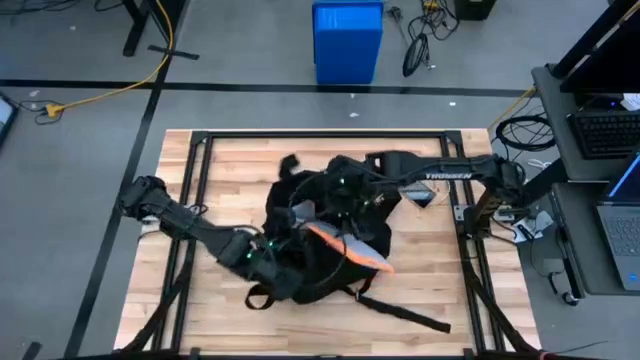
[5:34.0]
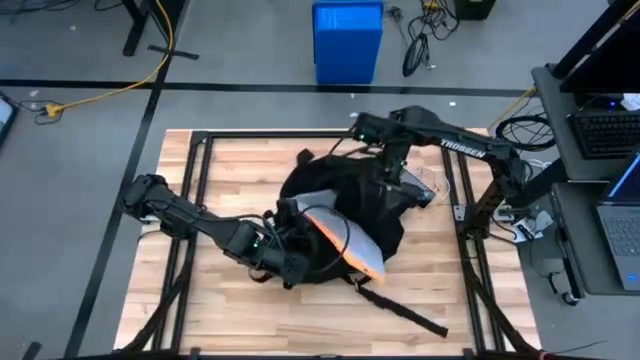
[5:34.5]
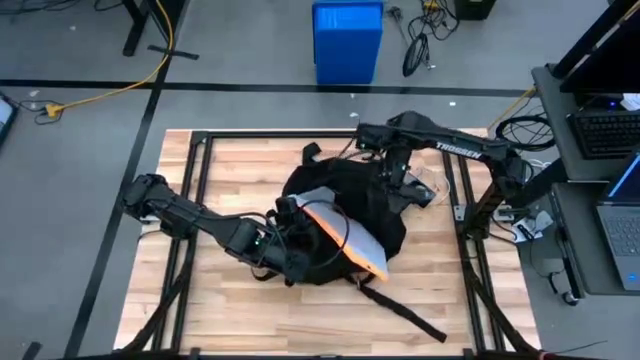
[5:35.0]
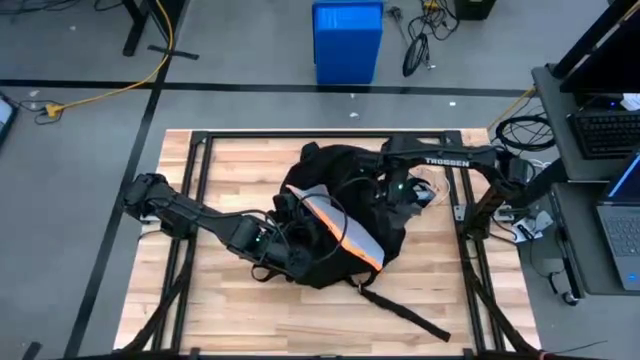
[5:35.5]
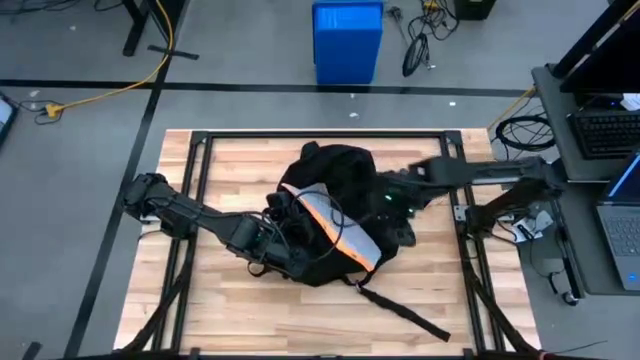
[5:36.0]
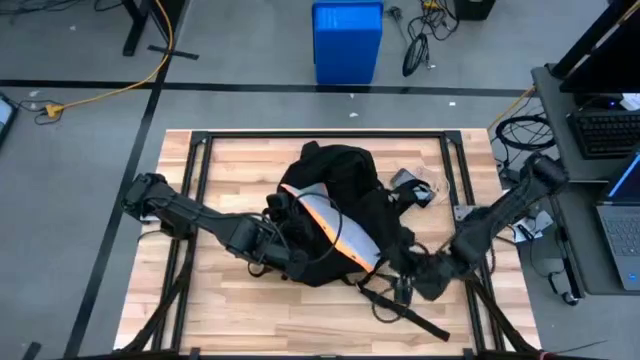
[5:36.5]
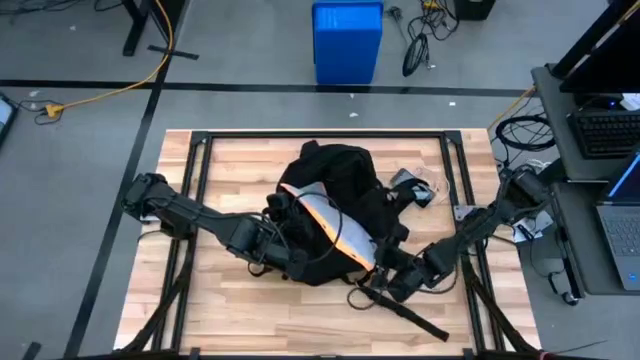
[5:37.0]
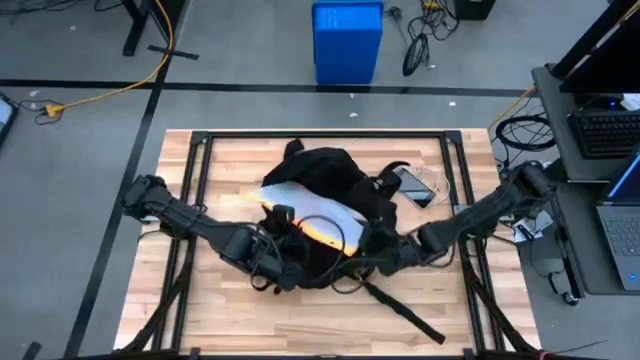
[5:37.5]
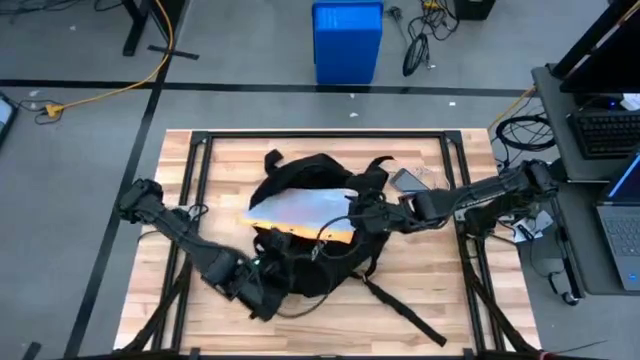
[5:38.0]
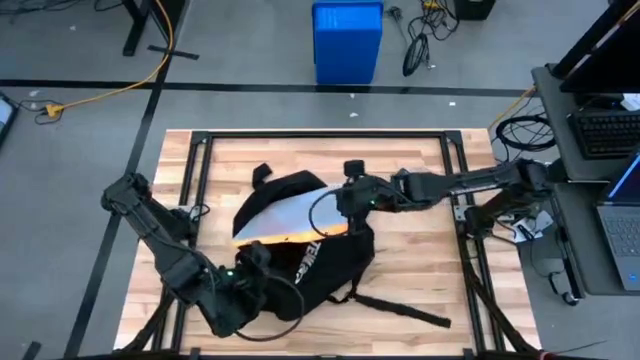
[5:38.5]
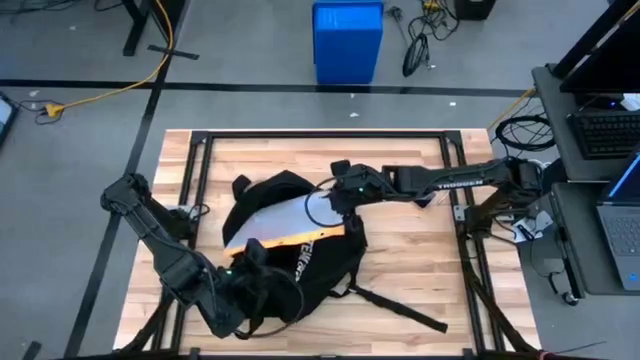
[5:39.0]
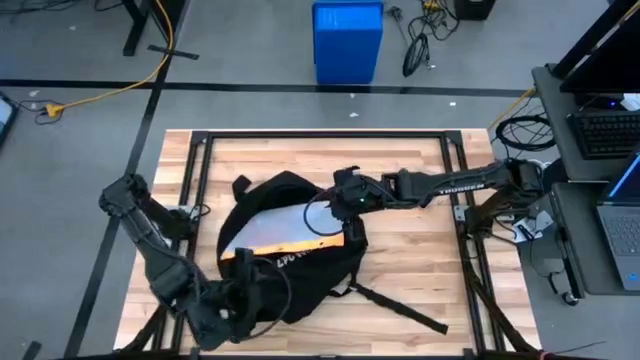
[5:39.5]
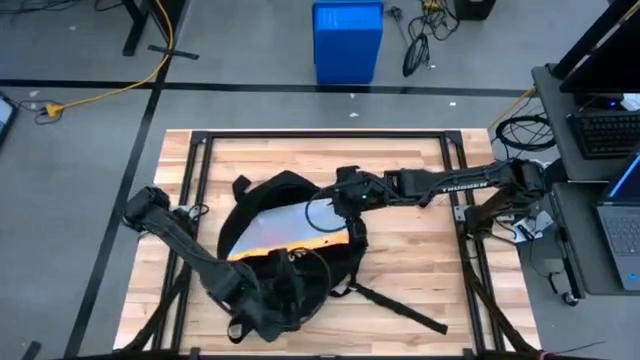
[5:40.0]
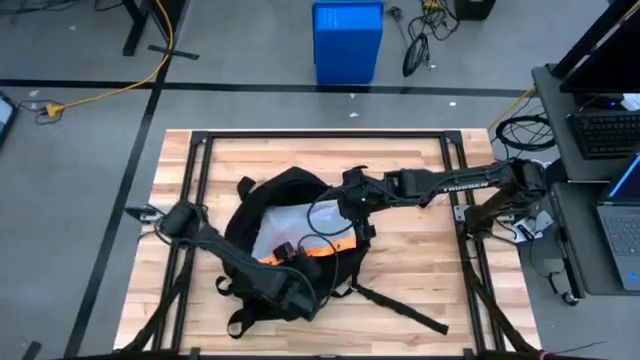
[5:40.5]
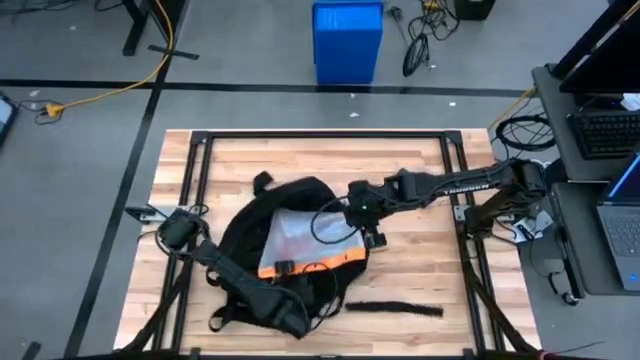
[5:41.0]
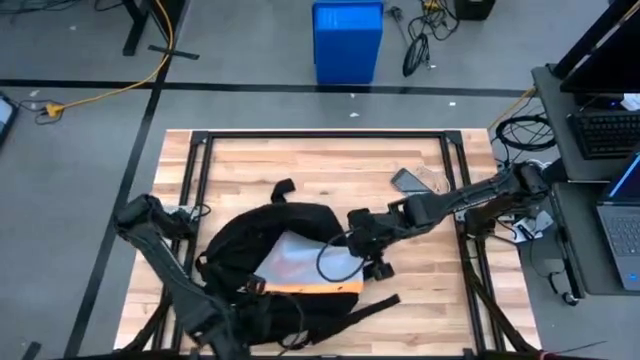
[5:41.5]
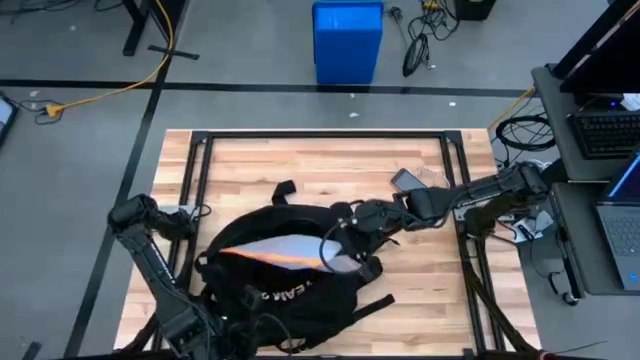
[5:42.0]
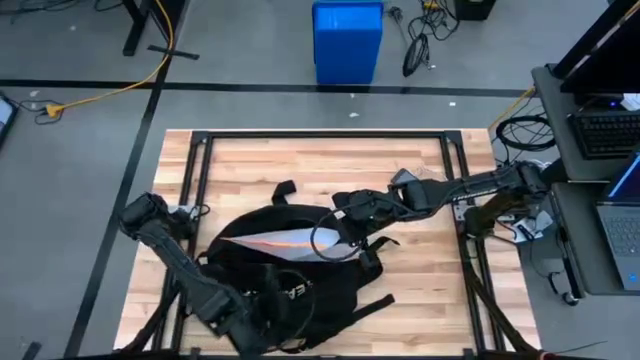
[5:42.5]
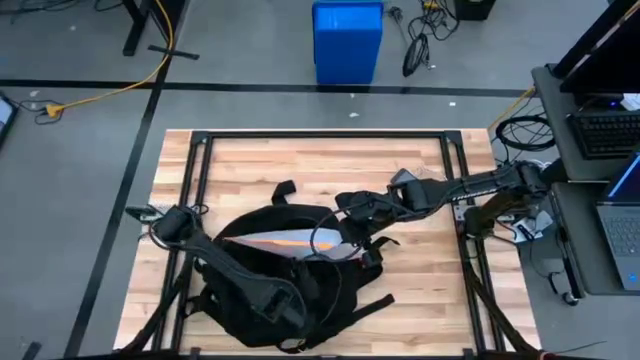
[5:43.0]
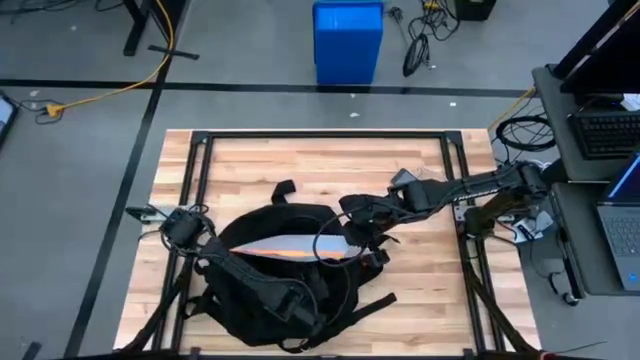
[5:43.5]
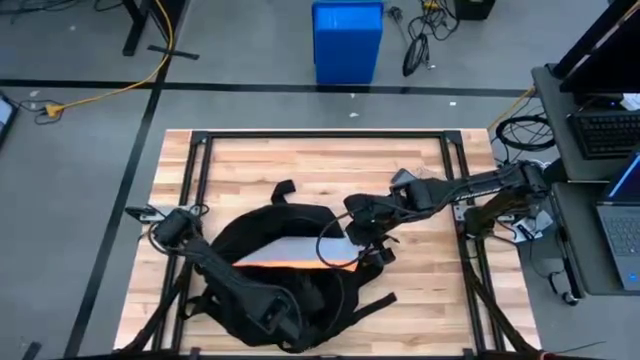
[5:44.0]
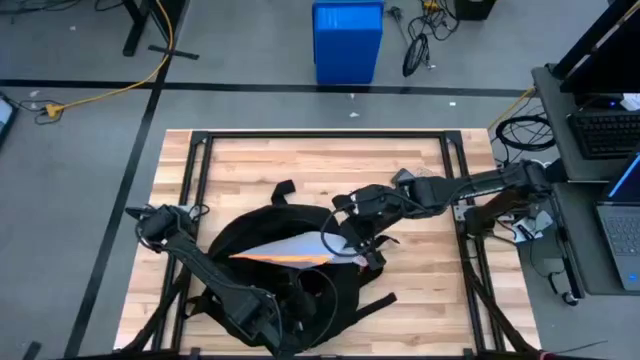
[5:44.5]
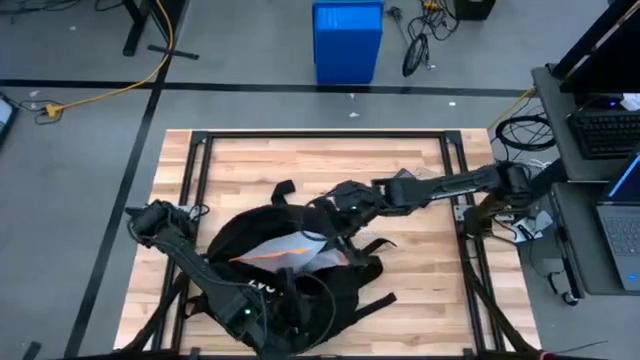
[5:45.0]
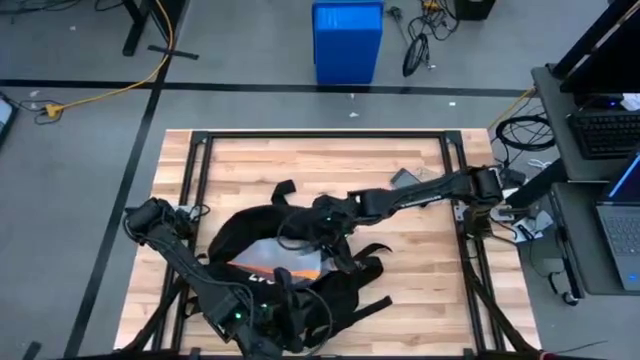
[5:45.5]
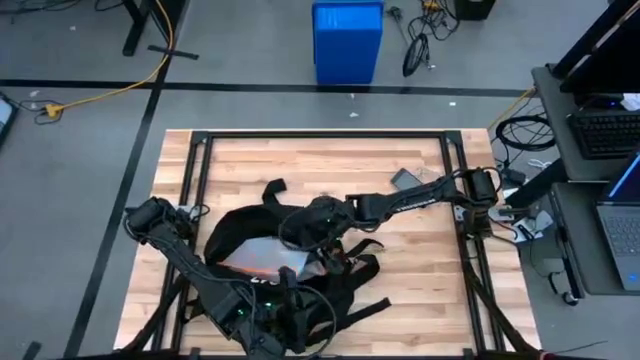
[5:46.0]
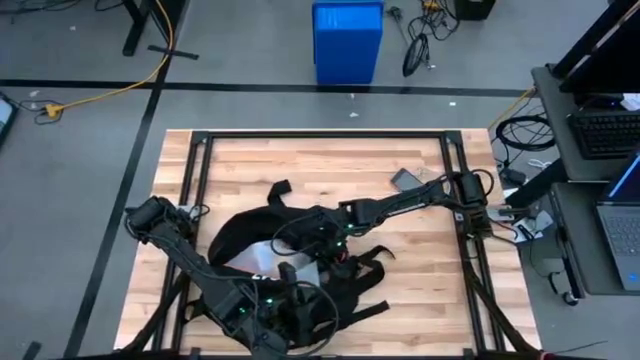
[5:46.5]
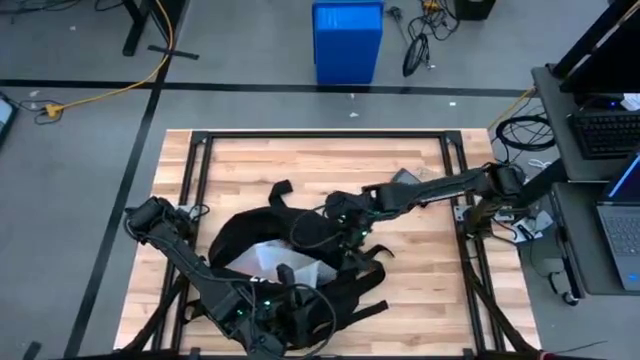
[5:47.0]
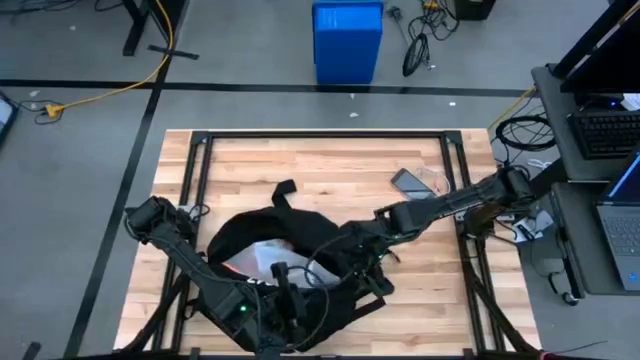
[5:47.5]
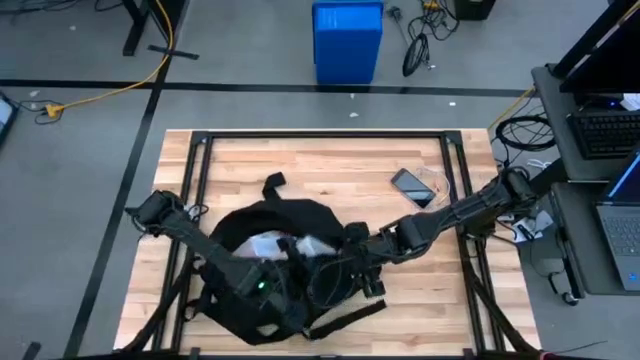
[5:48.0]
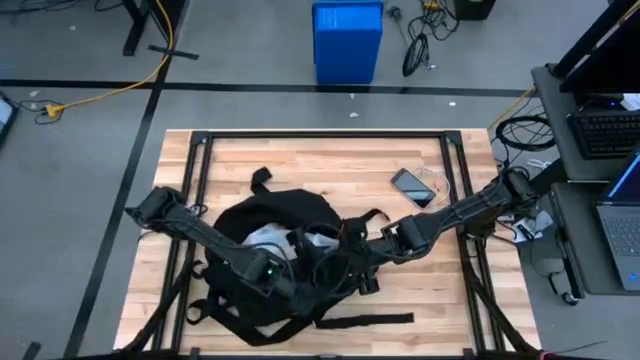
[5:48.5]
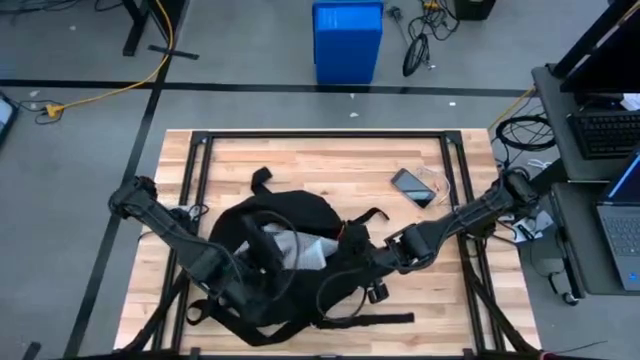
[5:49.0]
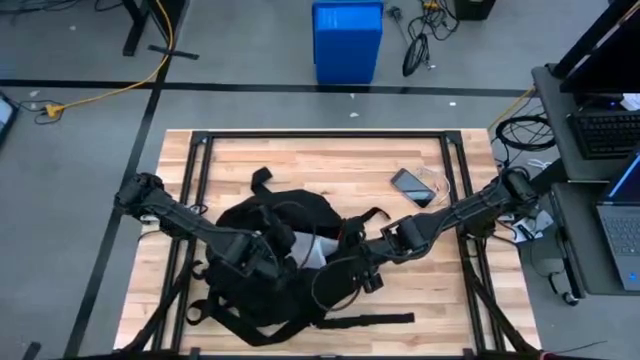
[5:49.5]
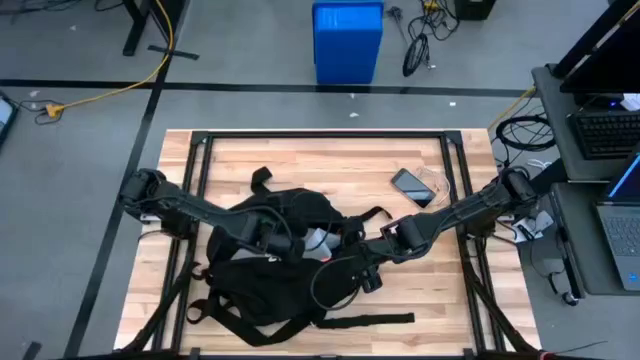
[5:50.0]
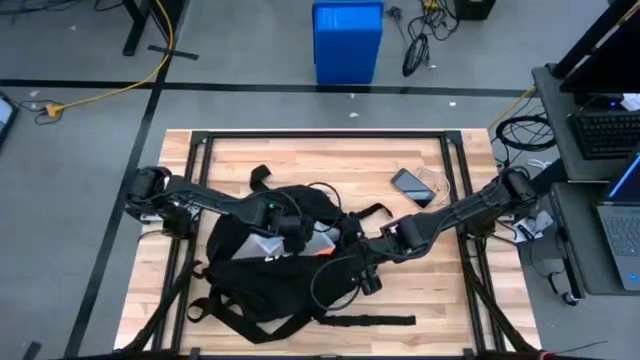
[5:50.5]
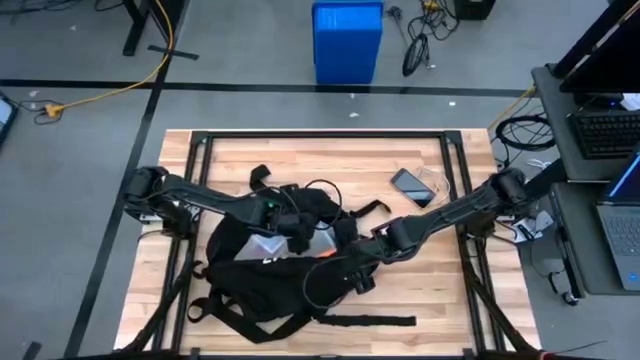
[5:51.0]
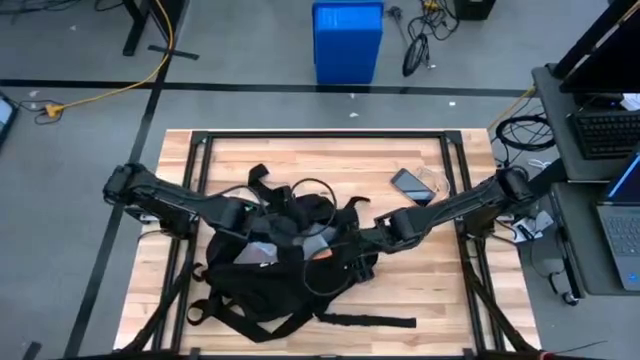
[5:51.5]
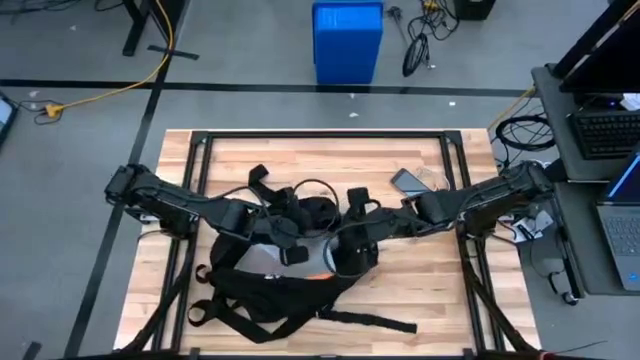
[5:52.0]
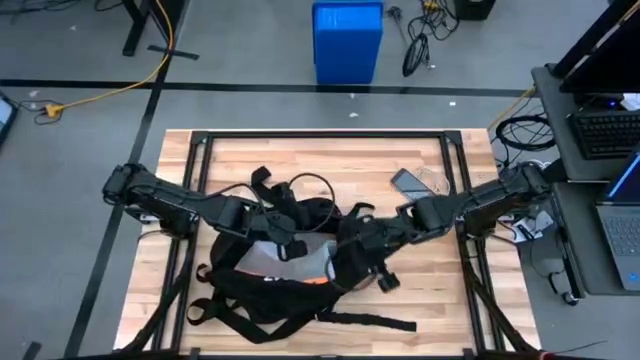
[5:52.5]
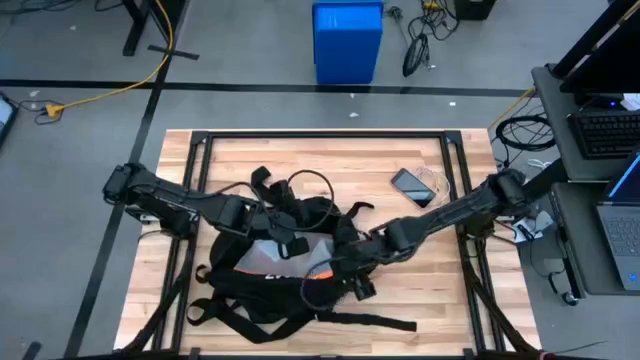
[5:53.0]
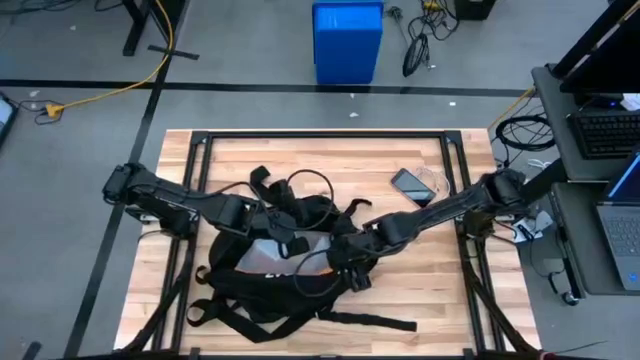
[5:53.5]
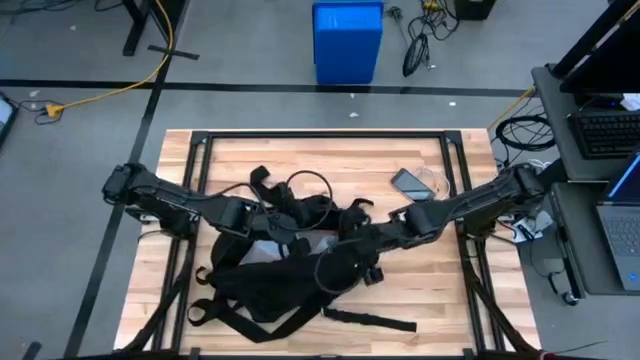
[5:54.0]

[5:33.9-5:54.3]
Task: Unpack backpack
Put the zip bag into the black backpack
